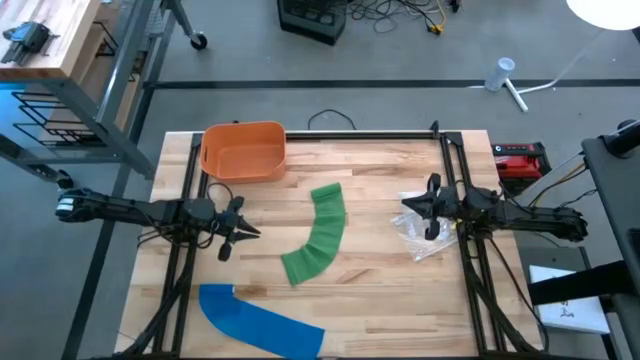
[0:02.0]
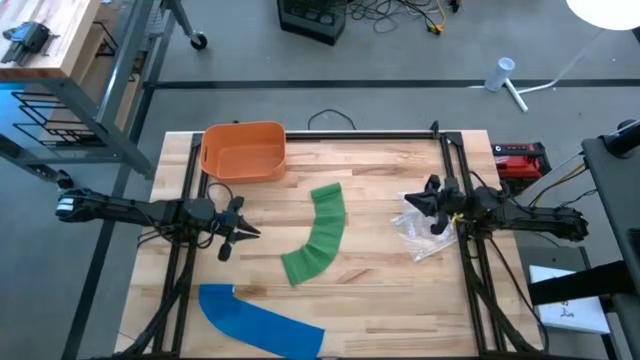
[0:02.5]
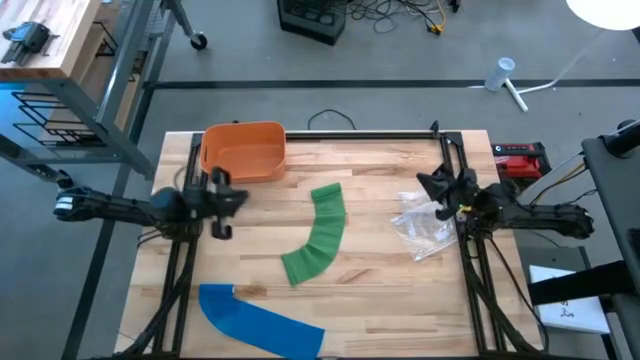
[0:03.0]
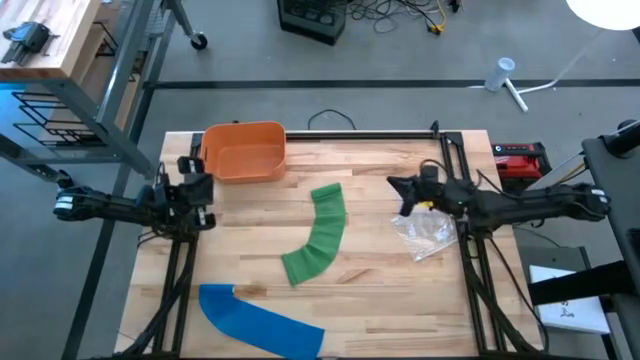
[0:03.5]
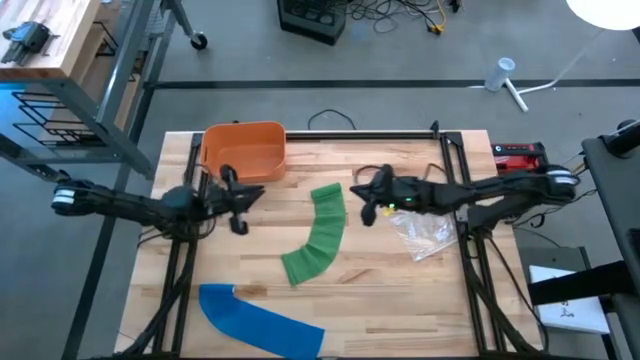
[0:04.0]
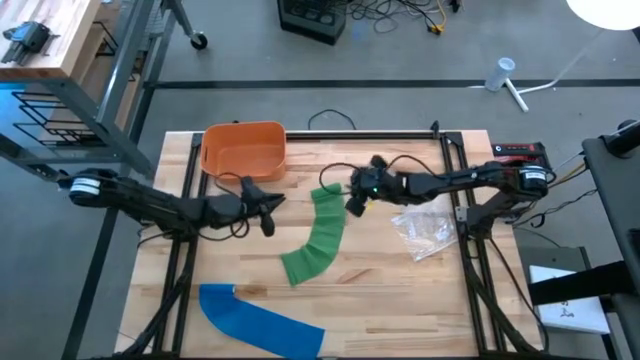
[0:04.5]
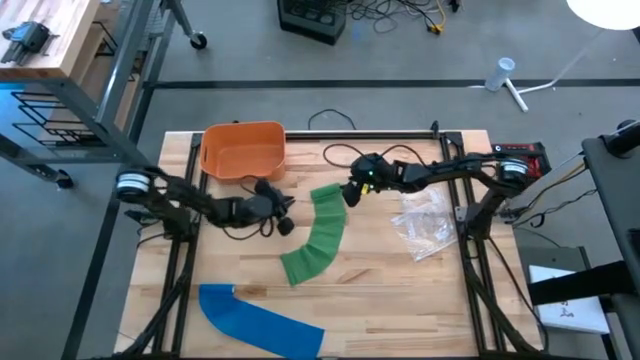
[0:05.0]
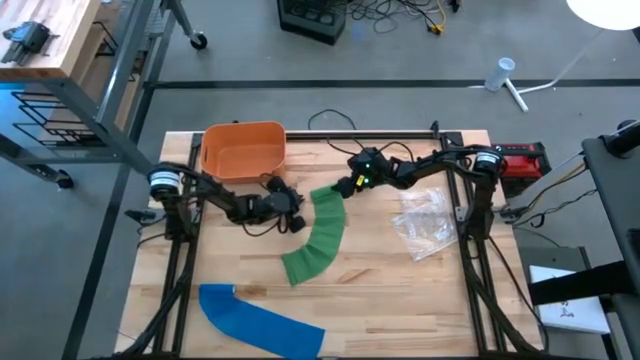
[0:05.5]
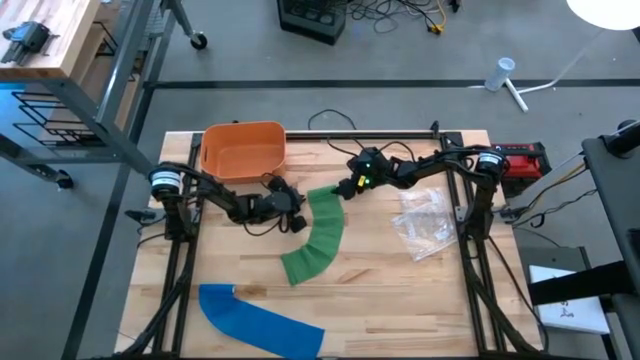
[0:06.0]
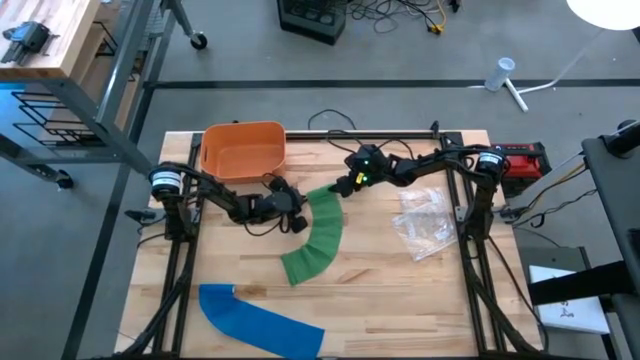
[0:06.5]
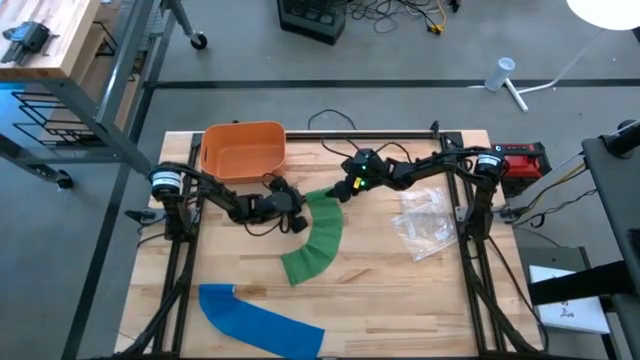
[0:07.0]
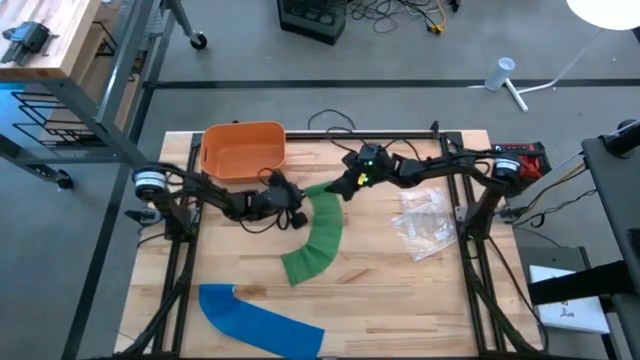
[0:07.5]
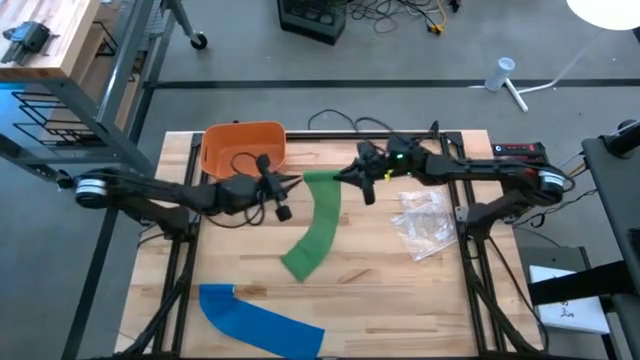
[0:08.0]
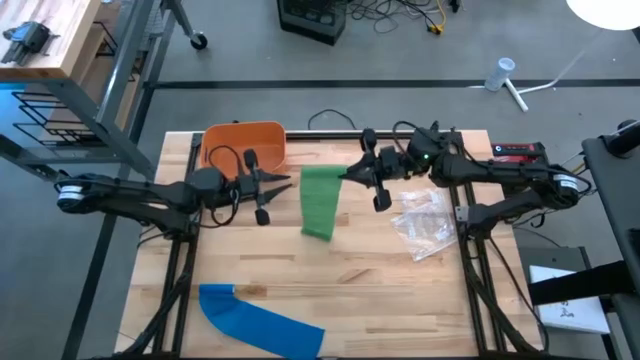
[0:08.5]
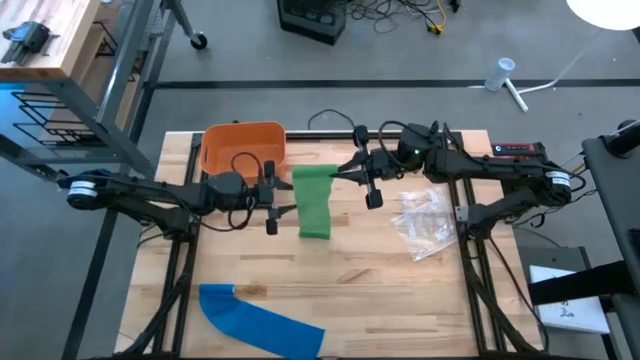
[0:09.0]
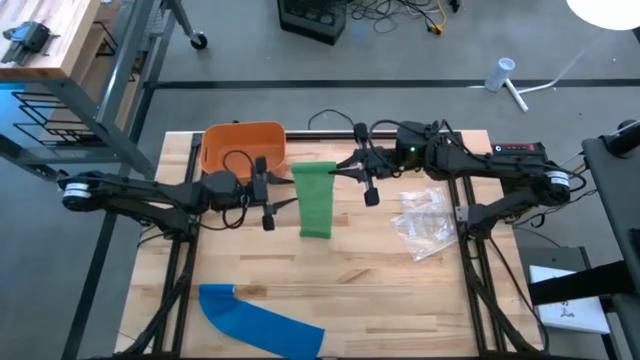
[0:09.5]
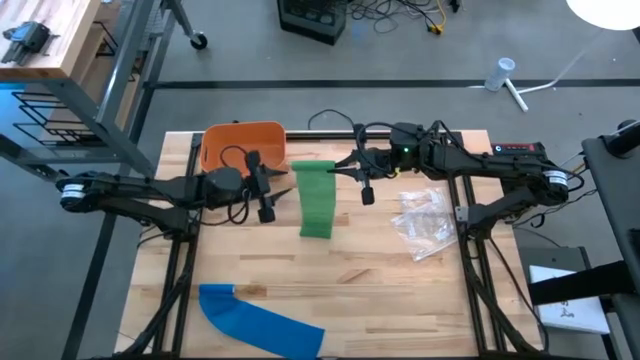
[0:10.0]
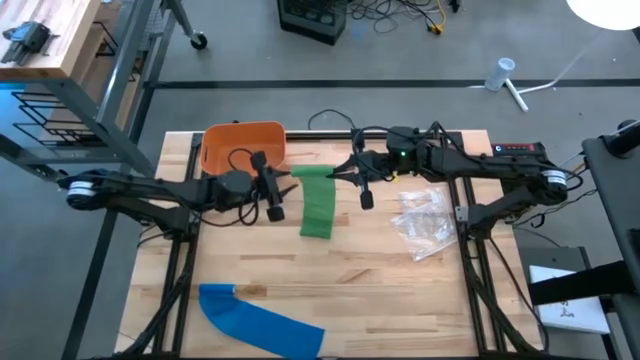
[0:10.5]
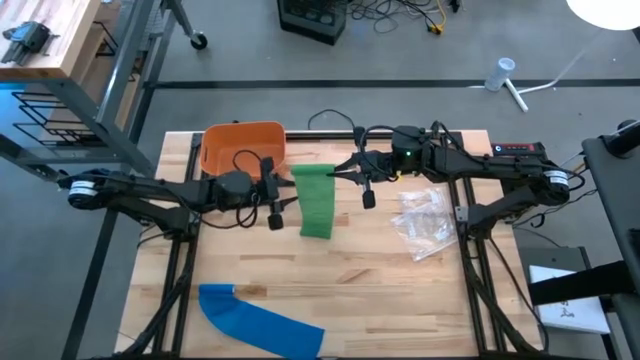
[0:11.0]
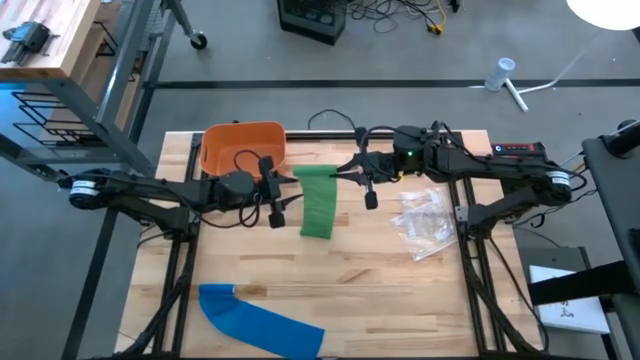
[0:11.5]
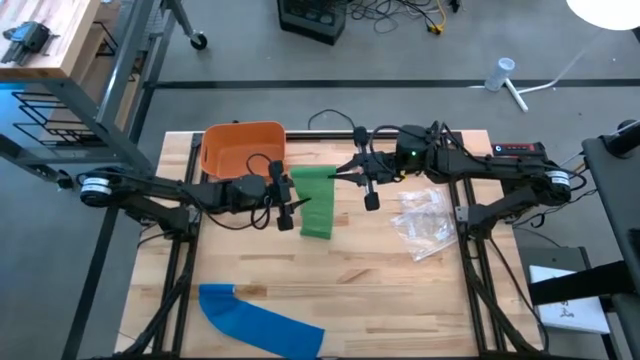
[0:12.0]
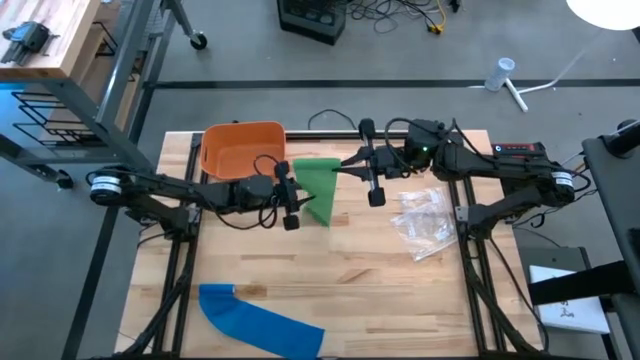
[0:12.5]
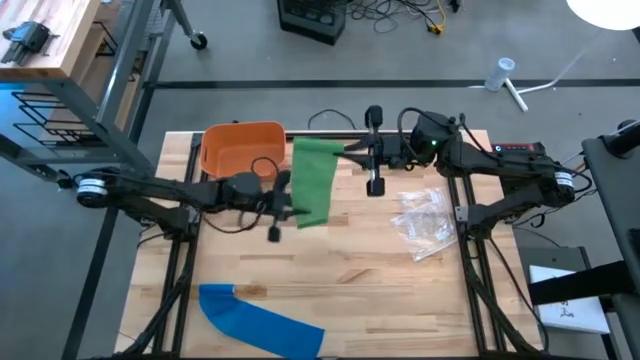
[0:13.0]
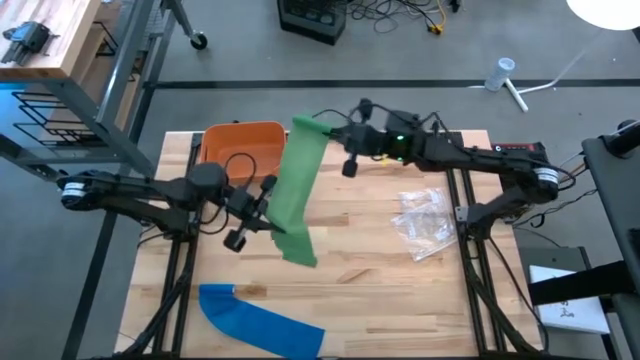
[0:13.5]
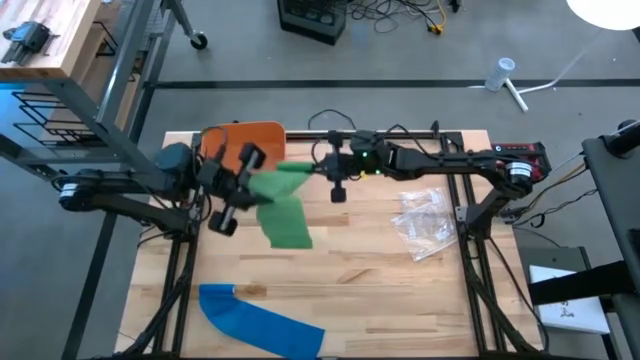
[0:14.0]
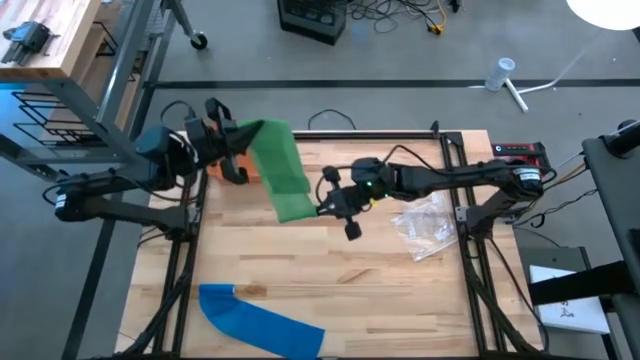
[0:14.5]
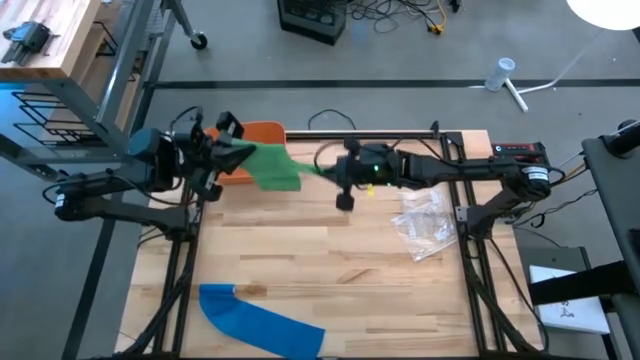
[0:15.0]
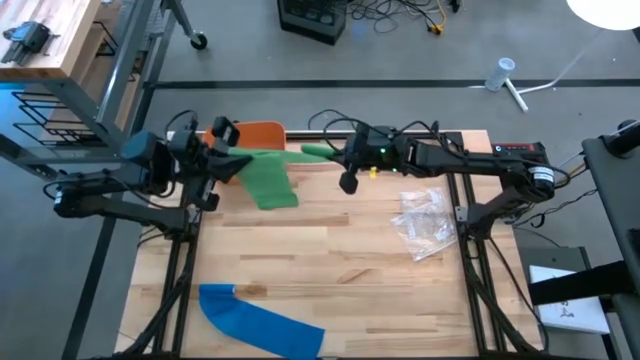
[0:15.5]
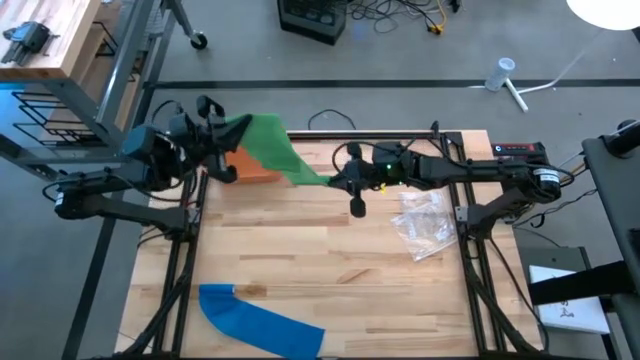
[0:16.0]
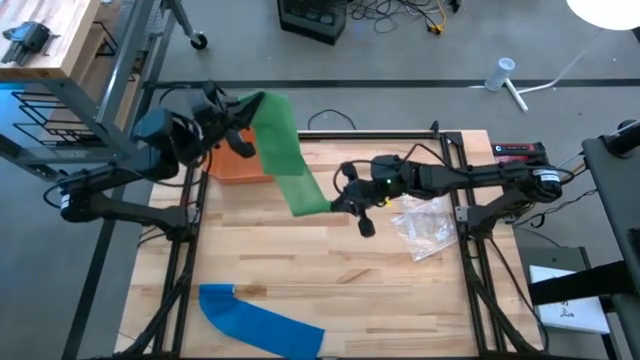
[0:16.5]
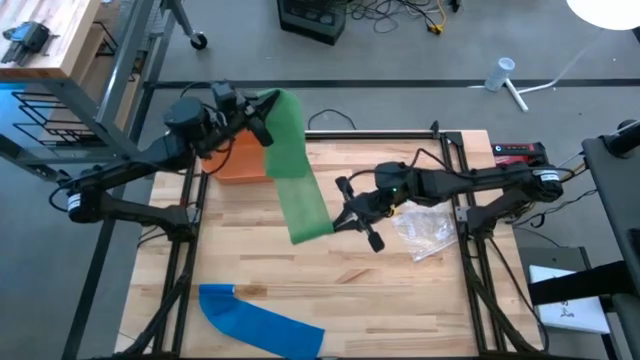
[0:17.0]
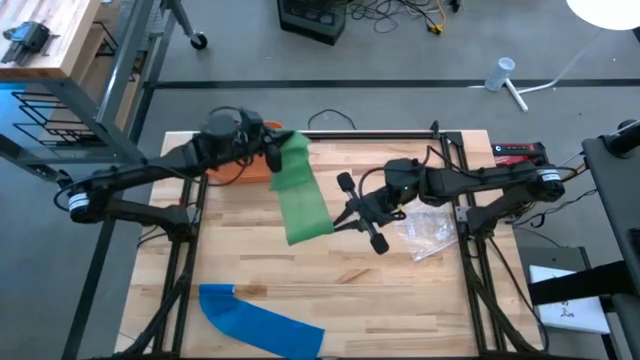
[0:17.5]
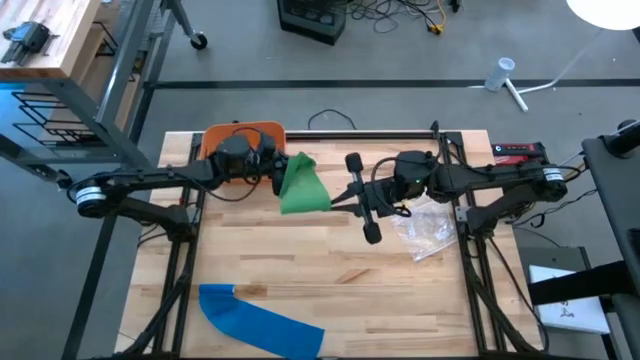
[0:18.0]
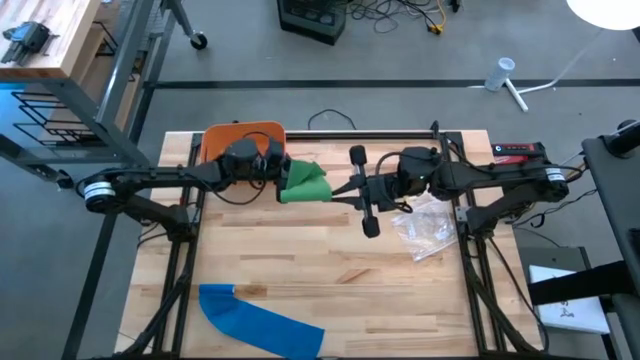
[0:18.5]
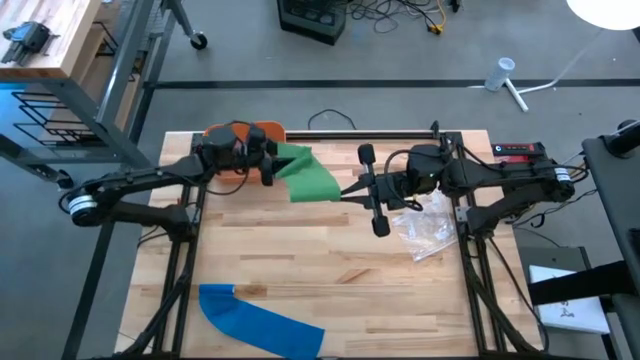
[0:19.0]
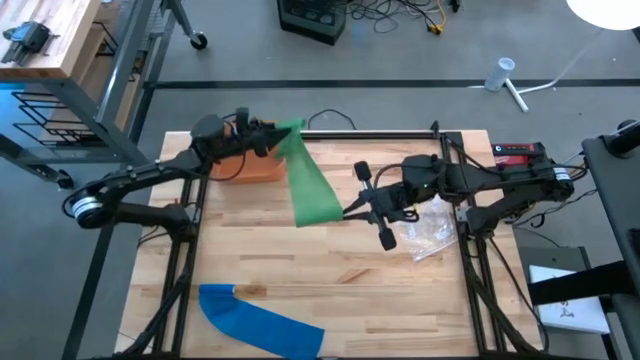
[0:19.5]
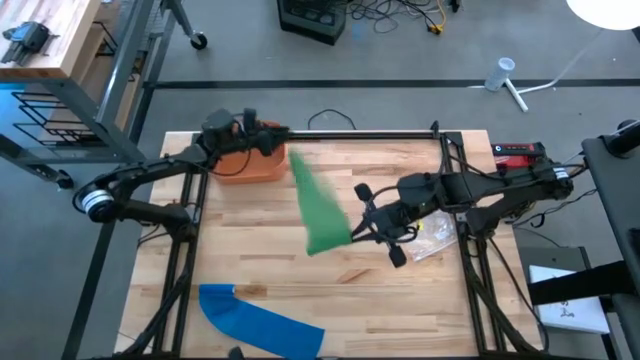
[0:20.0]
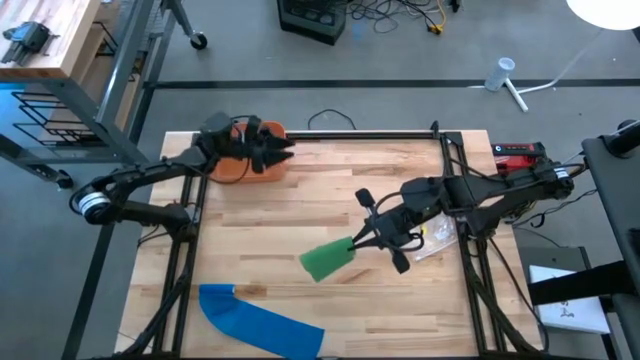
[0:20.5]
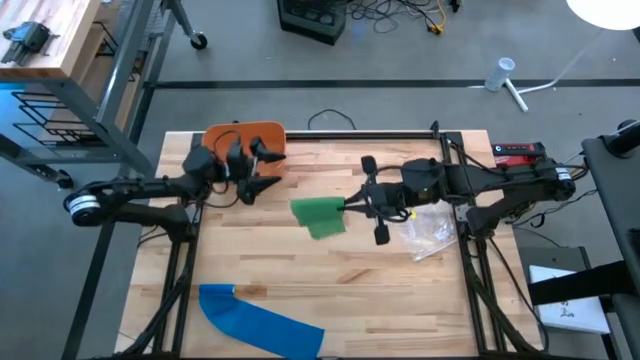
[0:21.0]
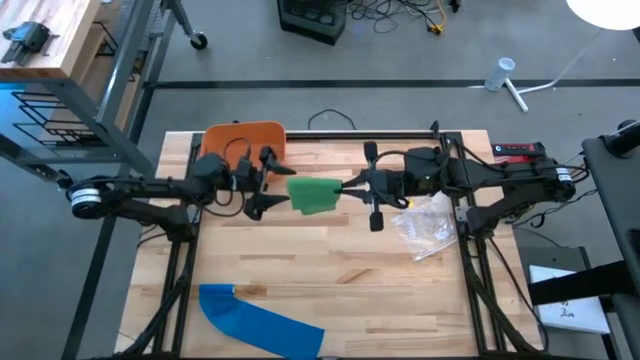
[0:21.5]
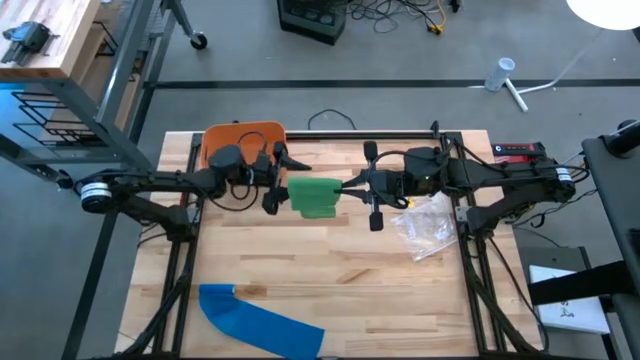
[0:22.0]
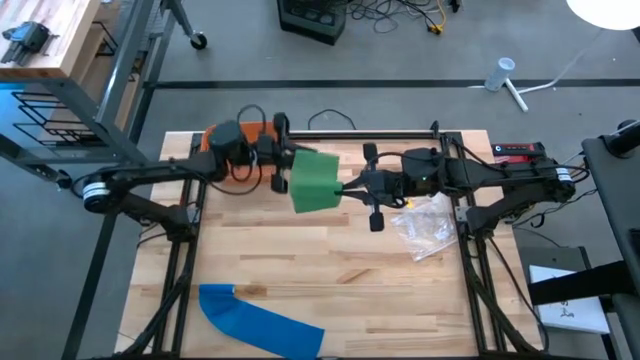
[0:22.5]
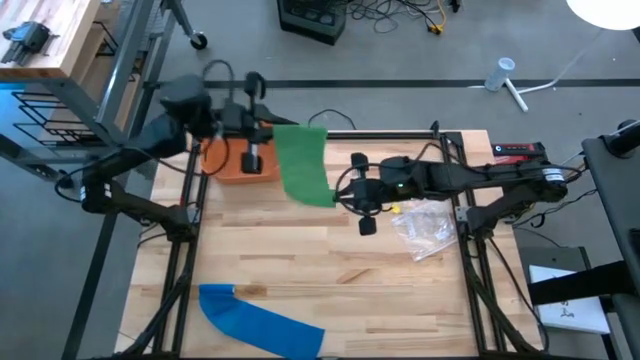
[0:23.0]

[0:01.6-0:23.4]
Task: Roll bandage
Roll the green bandage
